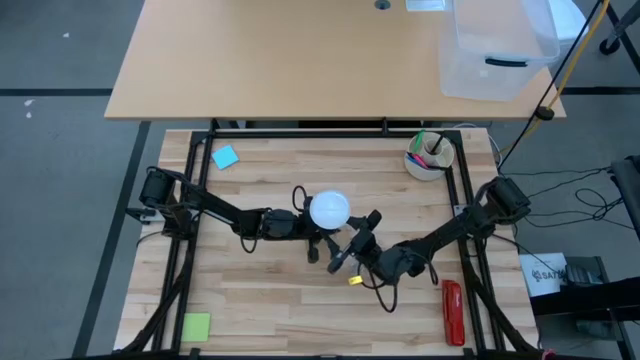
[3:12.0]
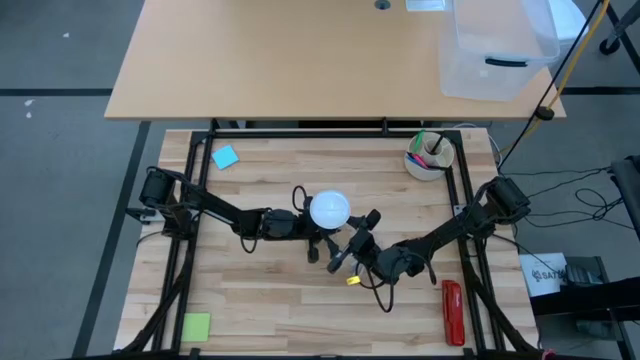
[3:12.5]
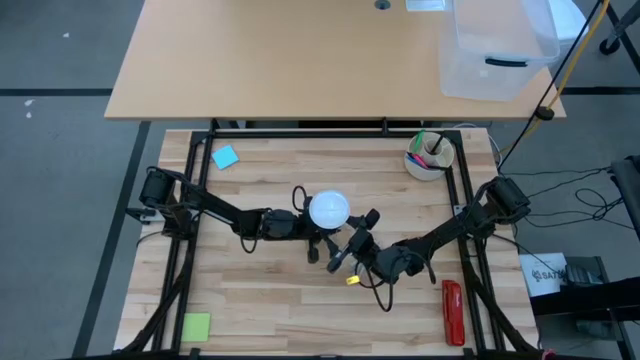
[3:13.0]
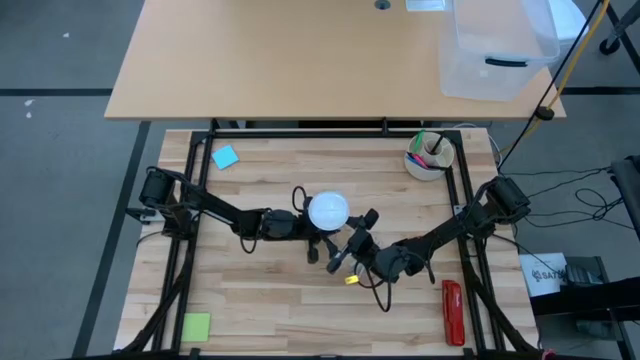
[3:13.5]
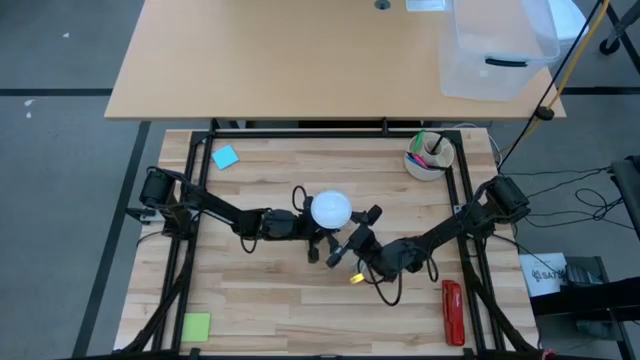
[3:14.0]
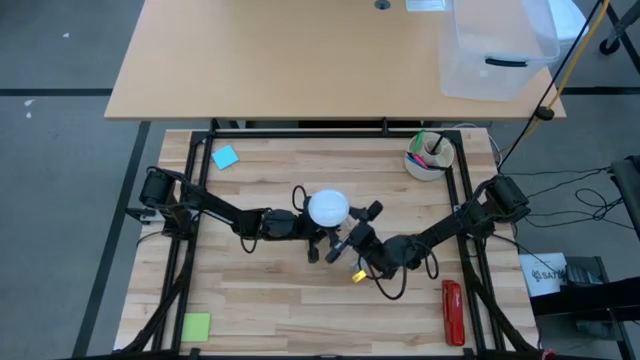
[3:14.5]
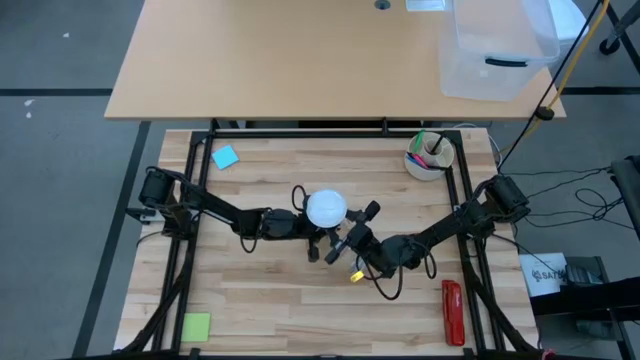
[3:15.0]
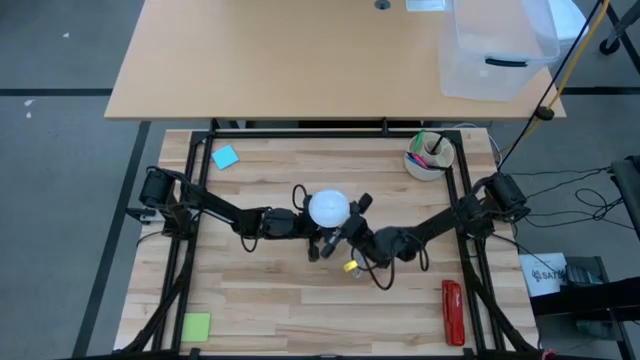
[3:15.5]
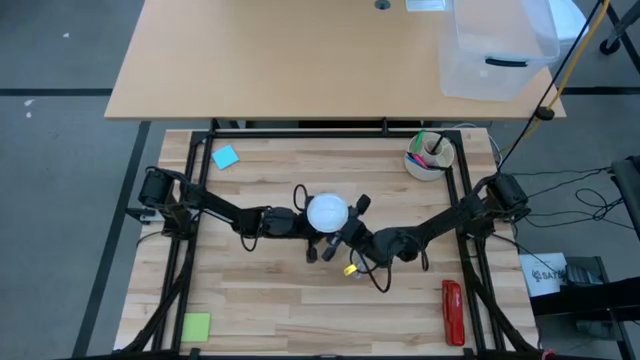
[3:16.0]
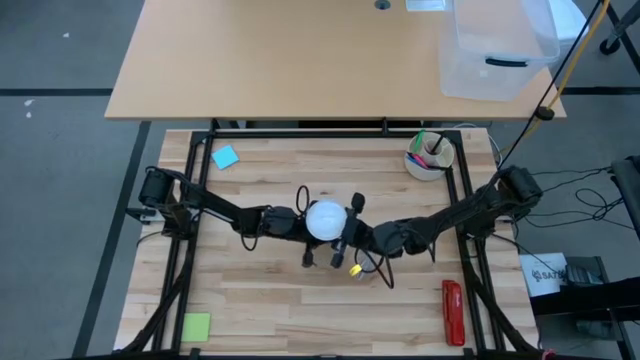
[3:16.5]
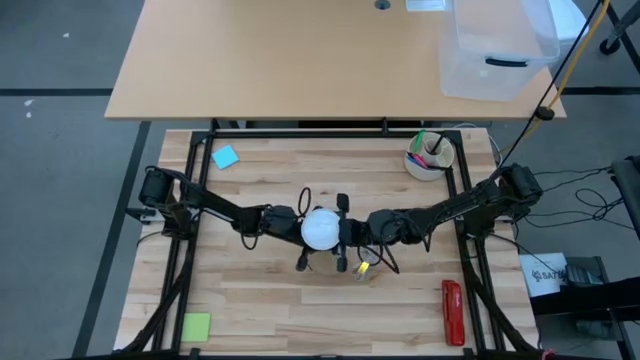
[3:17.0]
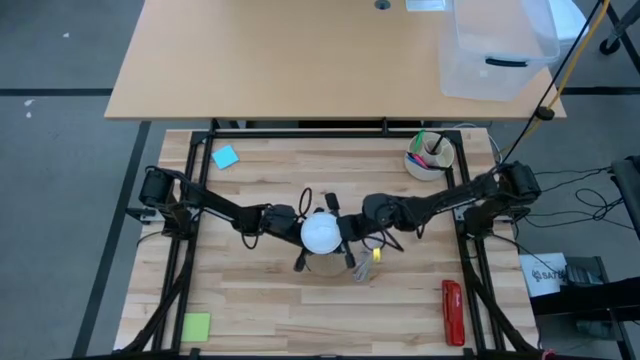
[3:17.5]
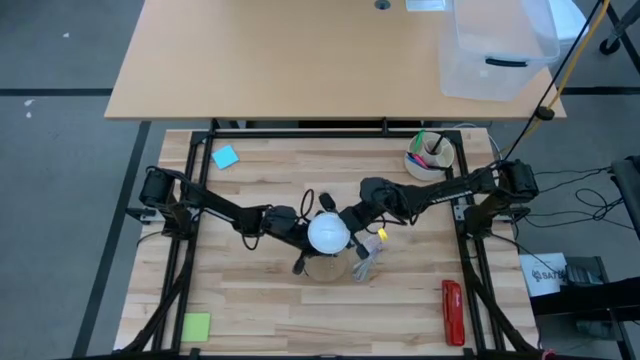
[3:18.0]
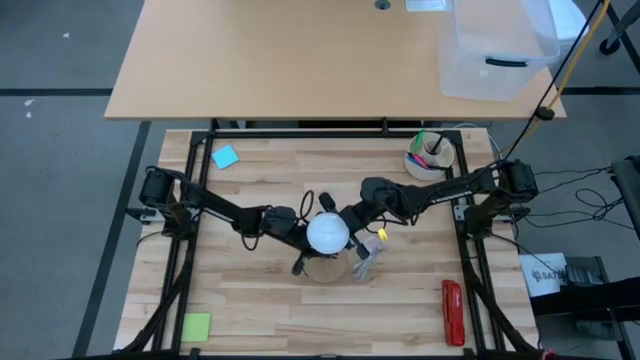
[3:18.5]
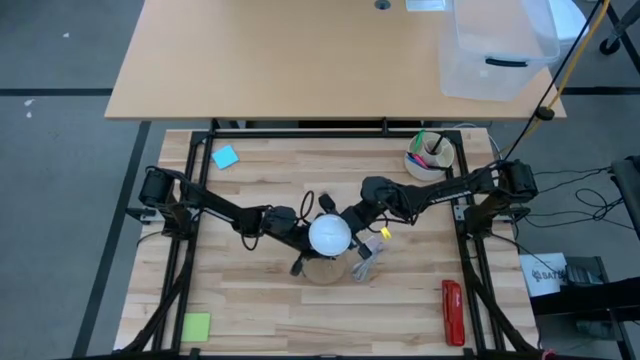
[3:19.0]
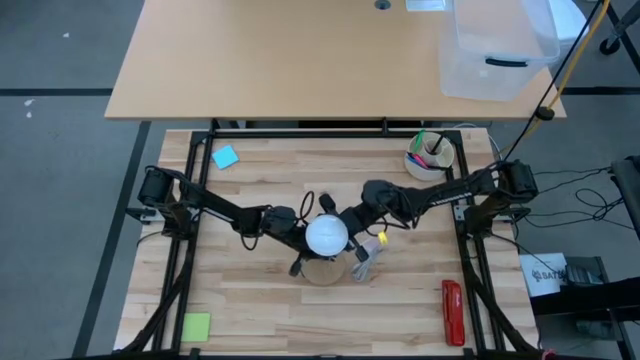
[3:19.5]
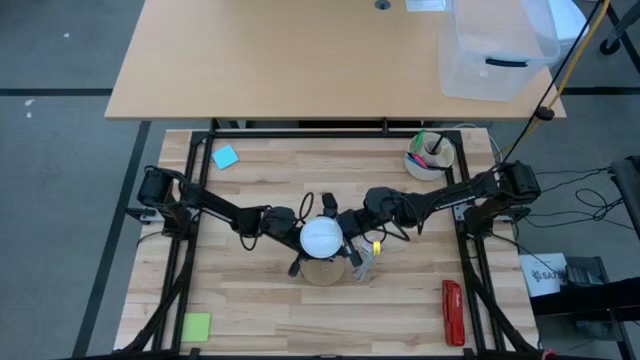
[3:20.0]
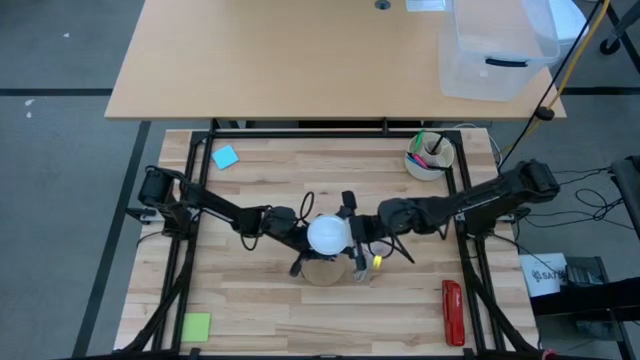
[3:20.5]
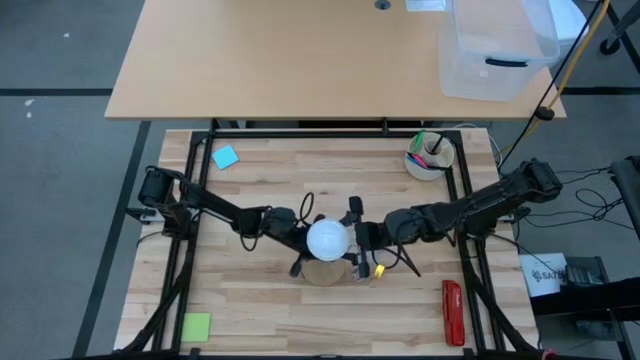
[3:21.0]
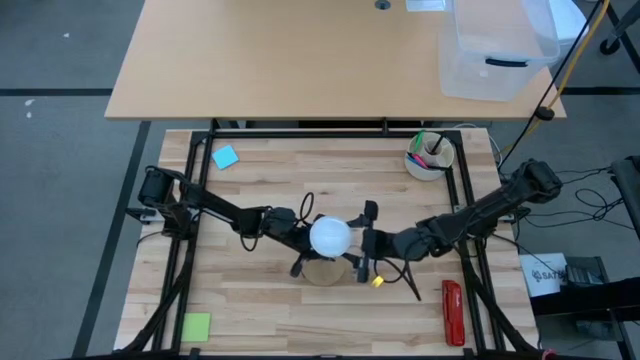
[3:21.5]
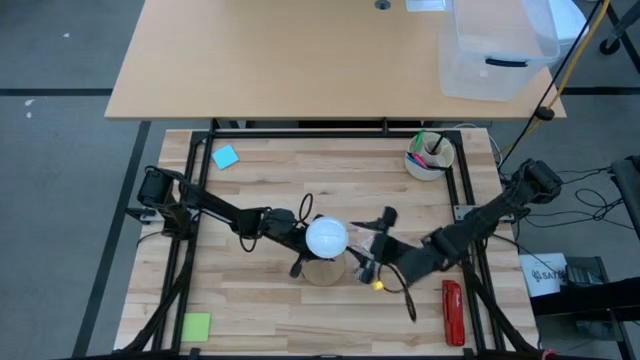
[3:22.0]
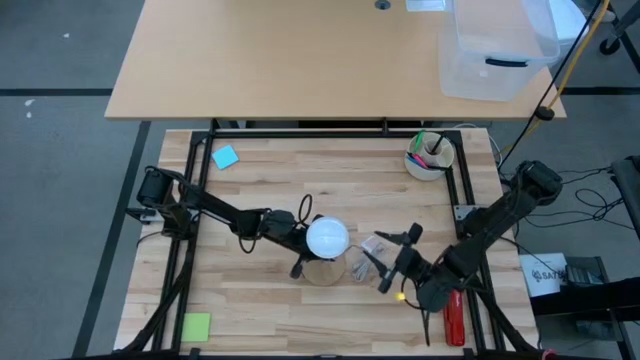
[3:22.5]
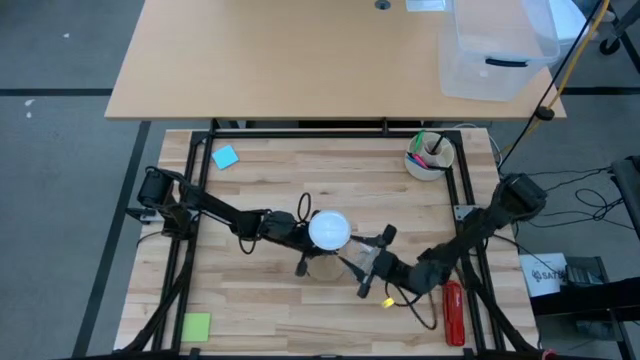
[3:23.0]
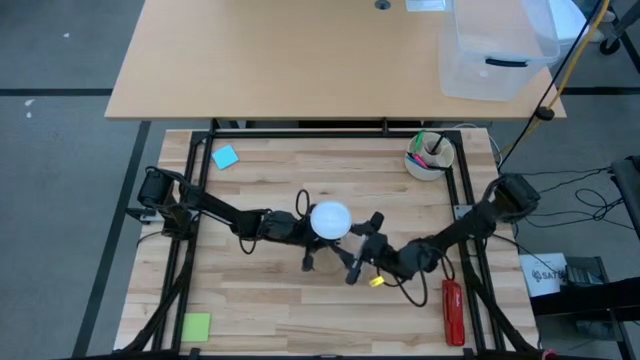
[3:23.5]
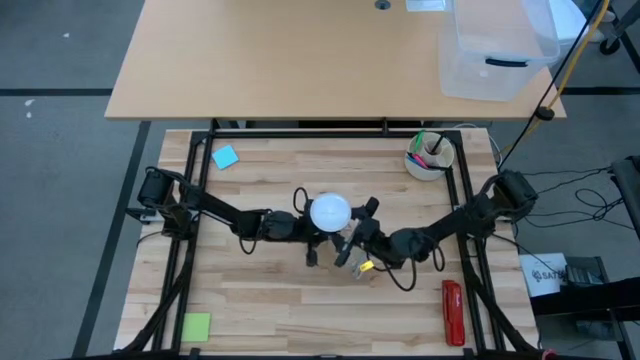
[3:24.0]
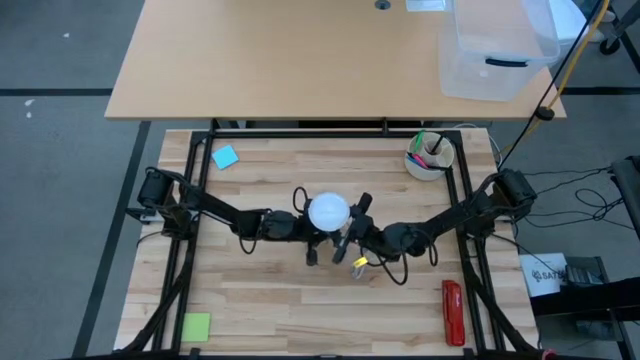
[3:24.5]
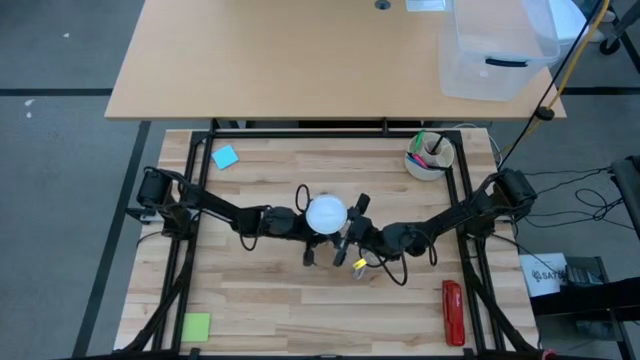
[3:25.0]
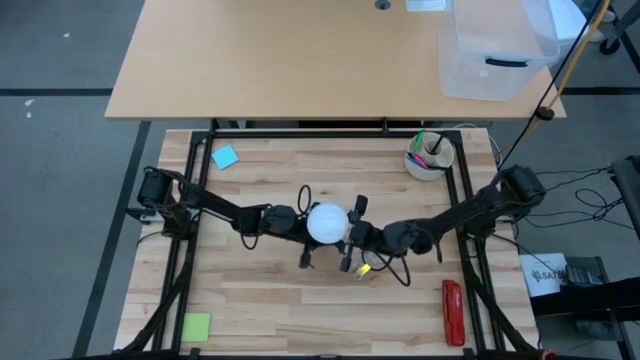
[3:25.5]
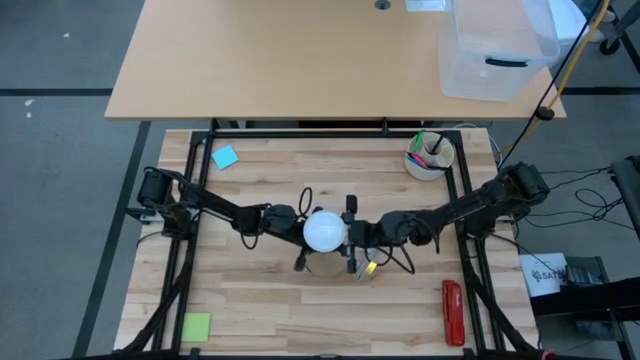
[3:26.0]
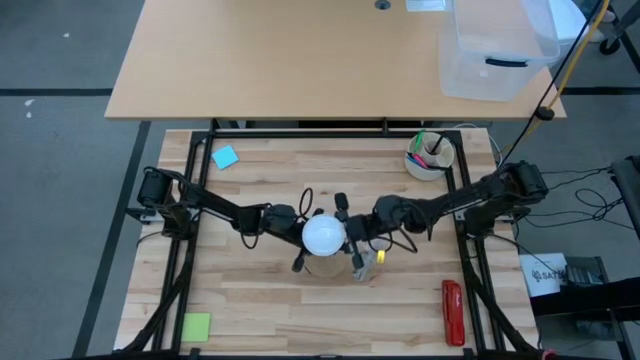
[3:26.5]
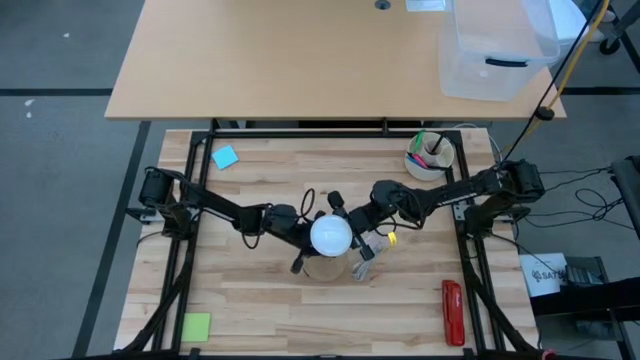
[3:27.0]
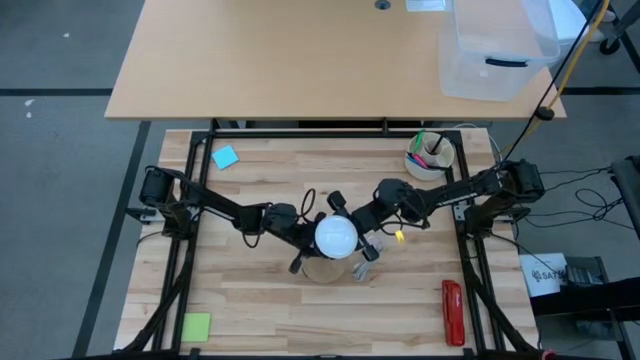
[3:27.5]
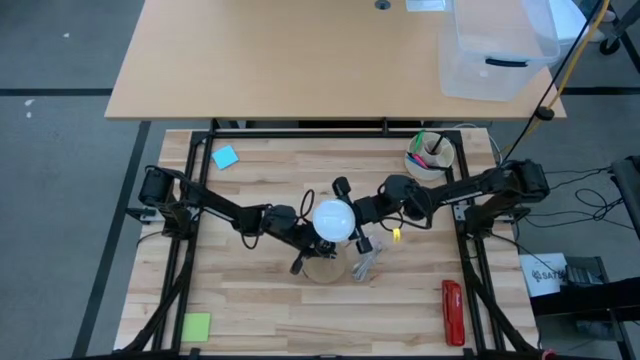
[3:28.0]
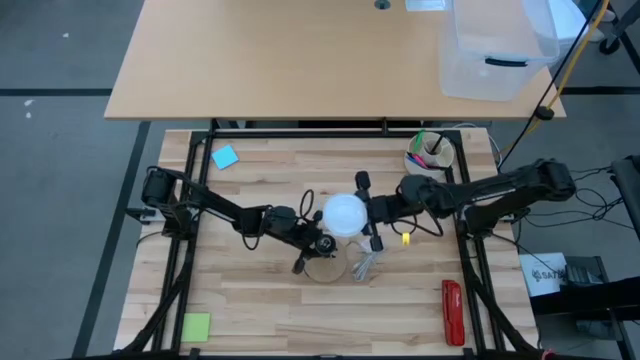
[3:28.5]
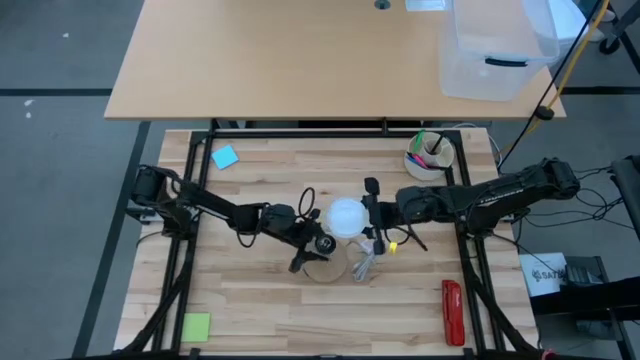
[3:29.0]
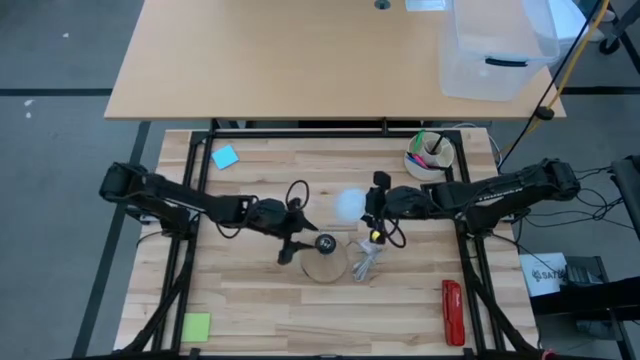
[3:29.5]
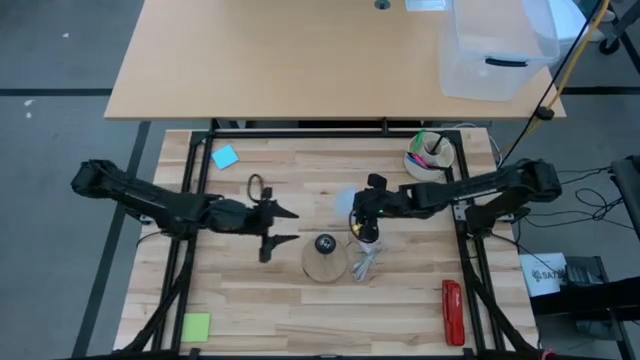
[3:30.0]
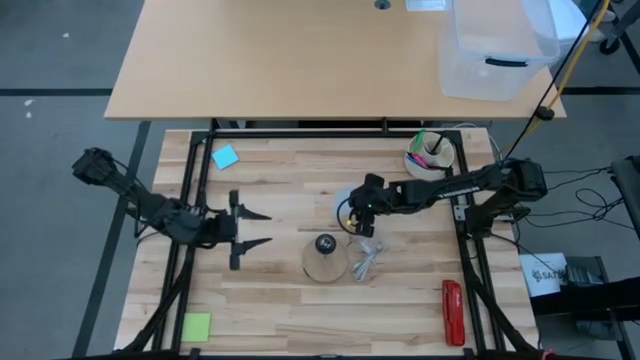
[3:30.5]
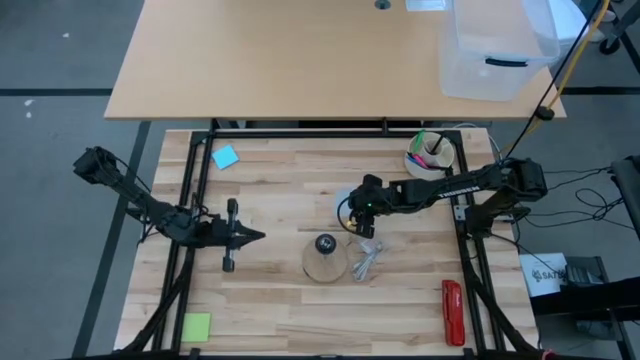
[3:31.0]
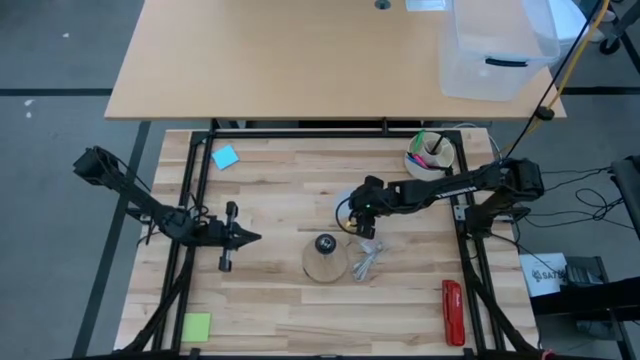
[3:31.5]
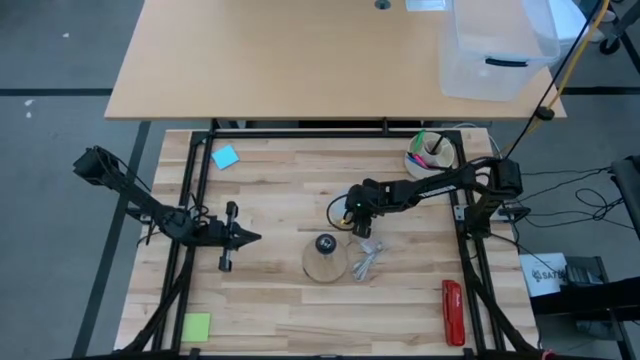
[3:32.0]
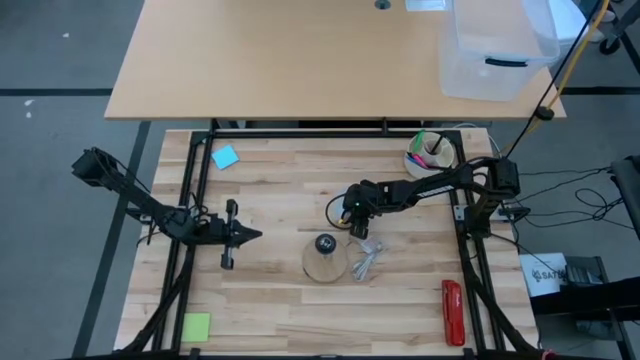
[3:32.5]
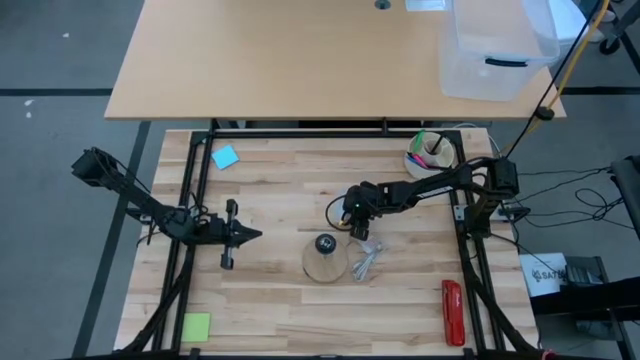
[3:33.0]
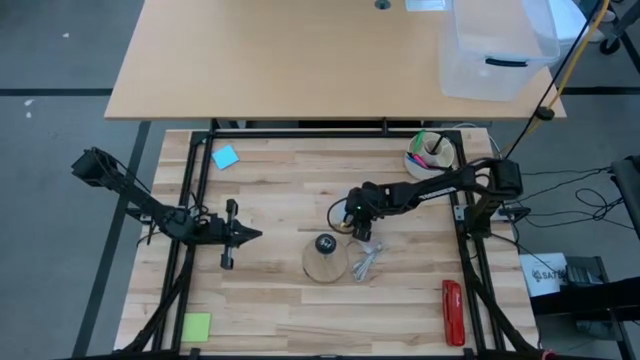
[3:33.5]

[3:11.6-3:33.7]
Task: Screw lightbulb
Remove the lightbulb from the lamp
